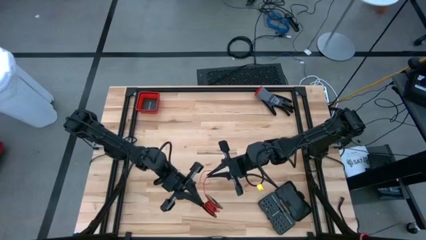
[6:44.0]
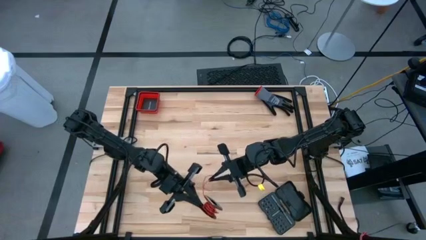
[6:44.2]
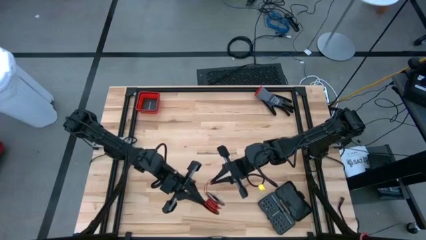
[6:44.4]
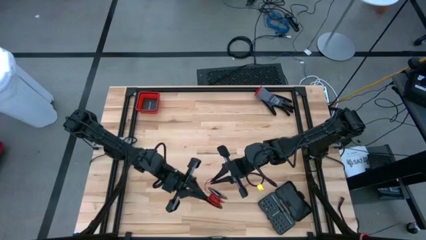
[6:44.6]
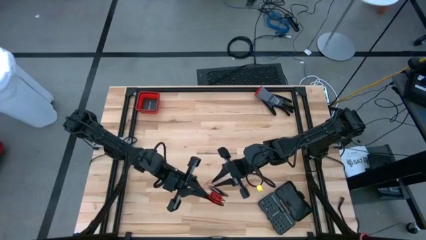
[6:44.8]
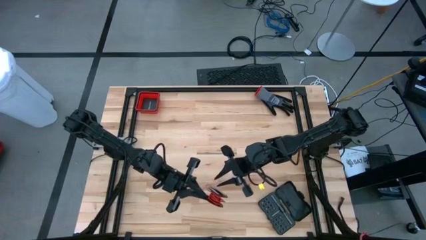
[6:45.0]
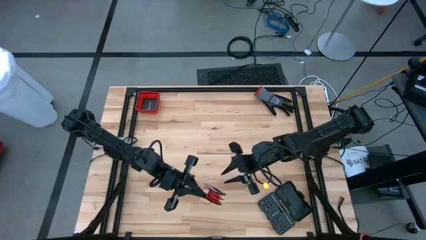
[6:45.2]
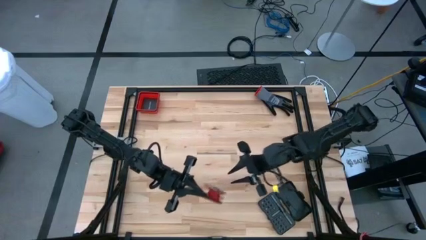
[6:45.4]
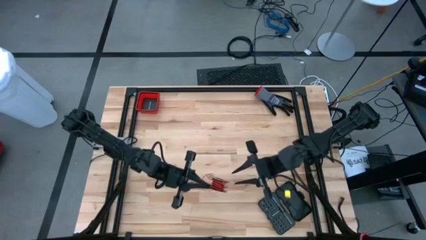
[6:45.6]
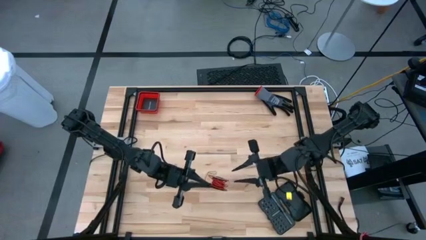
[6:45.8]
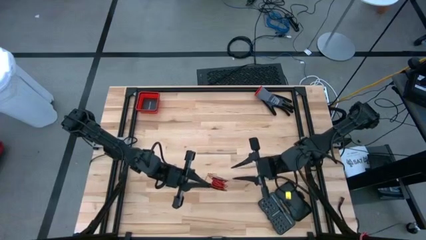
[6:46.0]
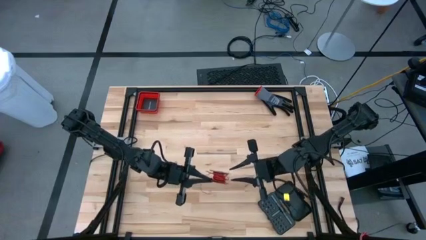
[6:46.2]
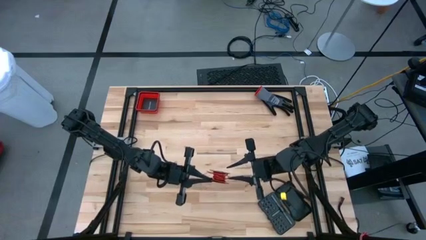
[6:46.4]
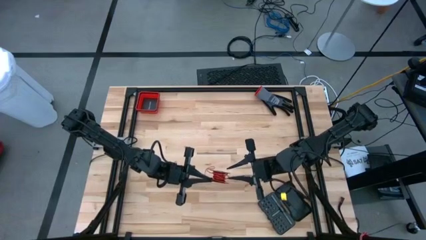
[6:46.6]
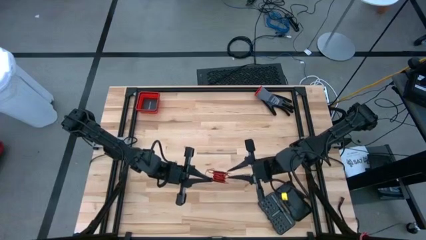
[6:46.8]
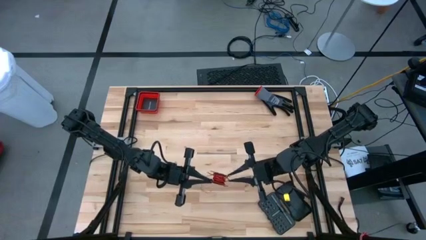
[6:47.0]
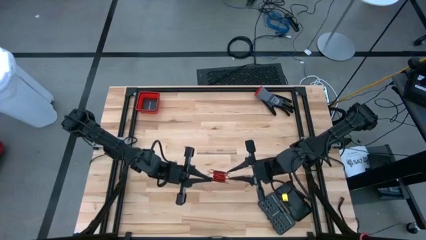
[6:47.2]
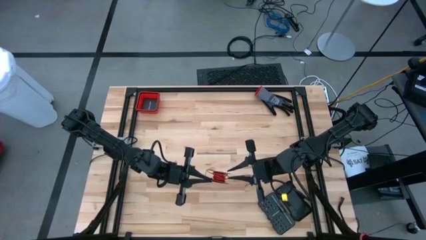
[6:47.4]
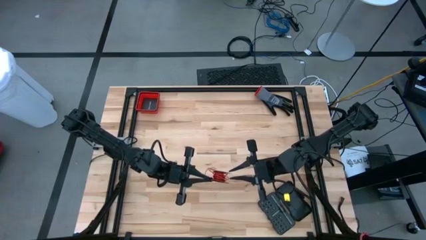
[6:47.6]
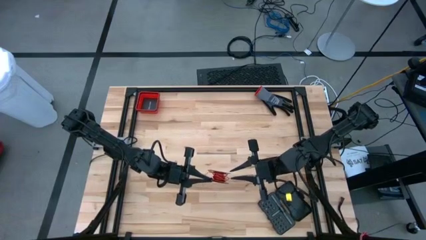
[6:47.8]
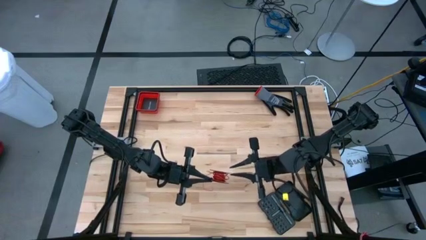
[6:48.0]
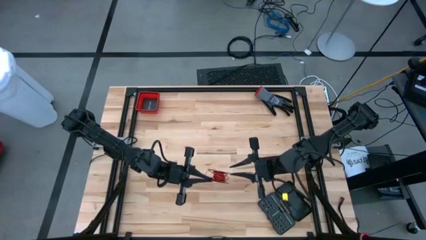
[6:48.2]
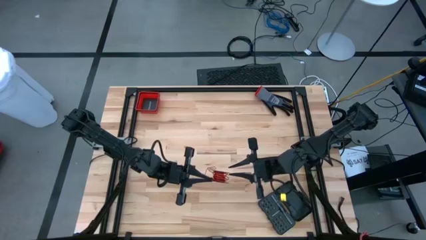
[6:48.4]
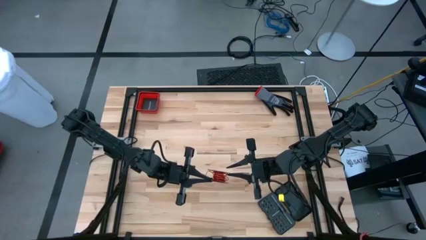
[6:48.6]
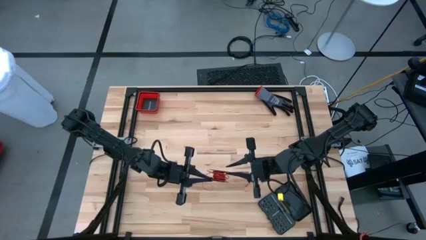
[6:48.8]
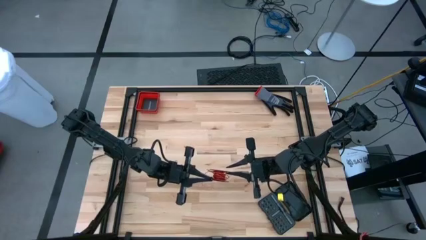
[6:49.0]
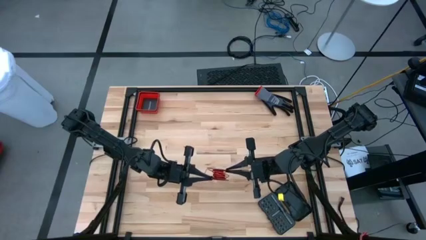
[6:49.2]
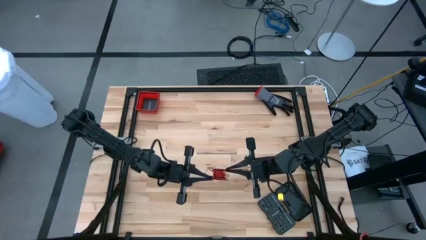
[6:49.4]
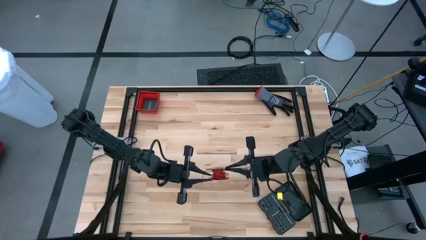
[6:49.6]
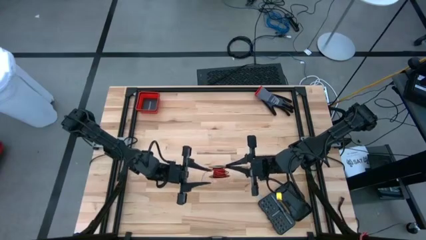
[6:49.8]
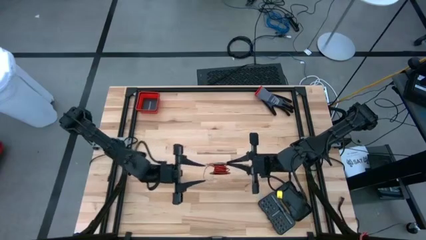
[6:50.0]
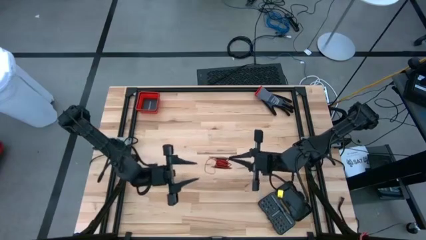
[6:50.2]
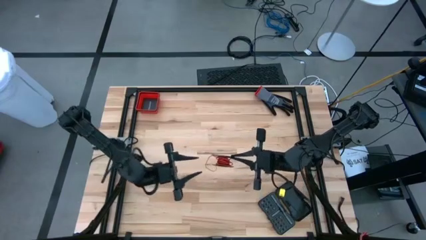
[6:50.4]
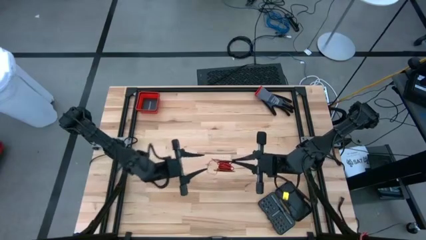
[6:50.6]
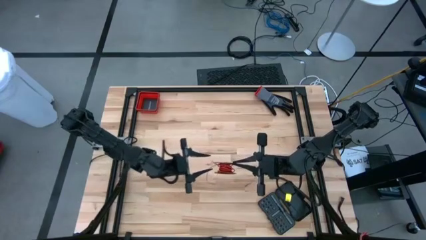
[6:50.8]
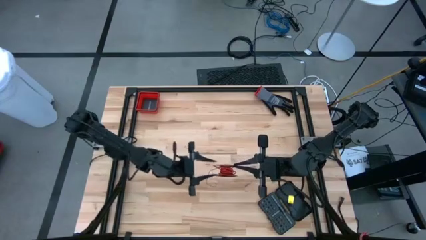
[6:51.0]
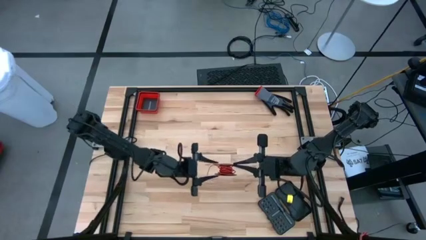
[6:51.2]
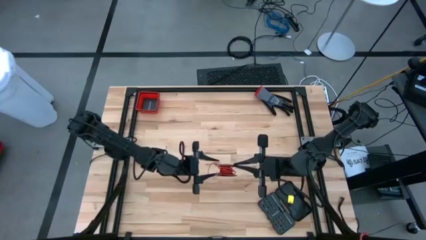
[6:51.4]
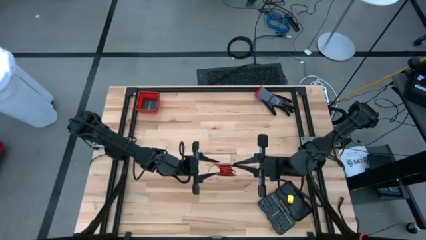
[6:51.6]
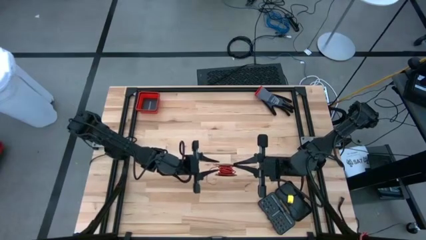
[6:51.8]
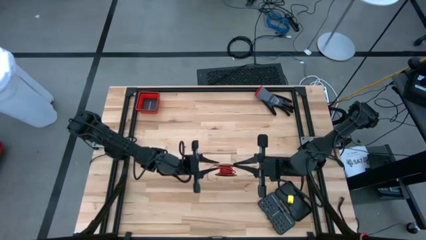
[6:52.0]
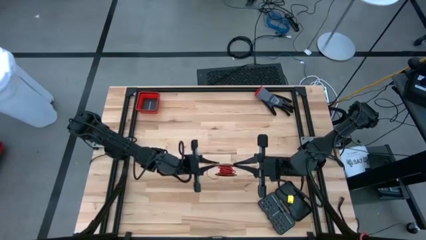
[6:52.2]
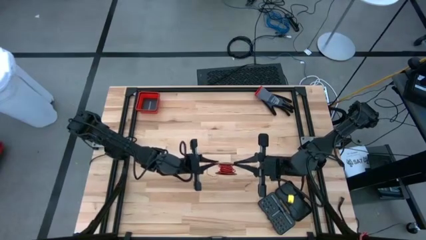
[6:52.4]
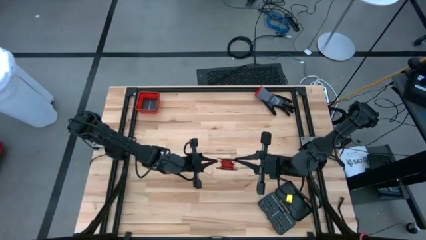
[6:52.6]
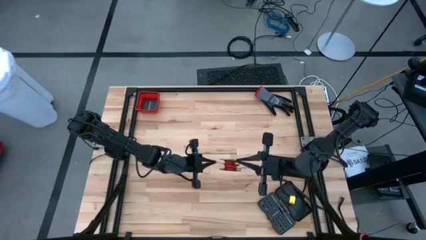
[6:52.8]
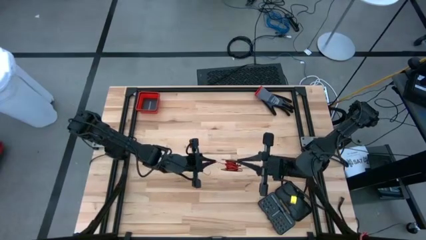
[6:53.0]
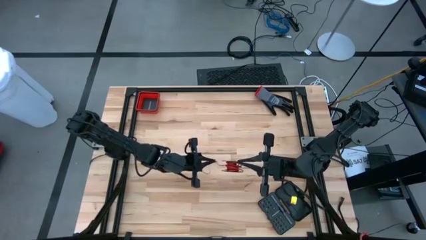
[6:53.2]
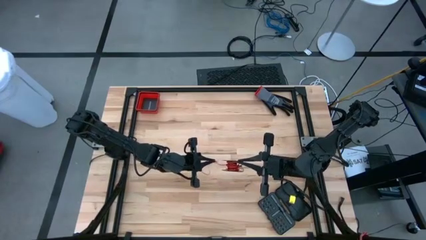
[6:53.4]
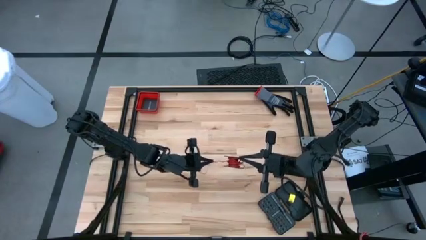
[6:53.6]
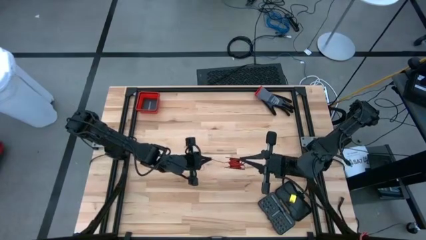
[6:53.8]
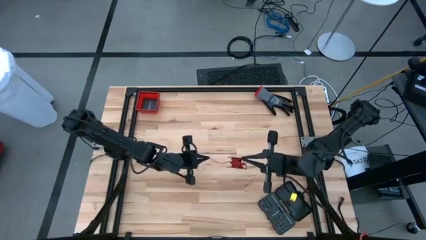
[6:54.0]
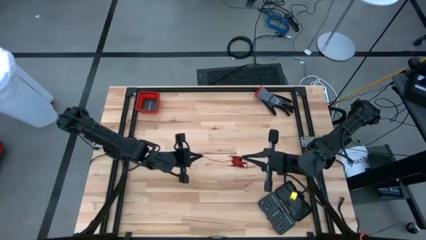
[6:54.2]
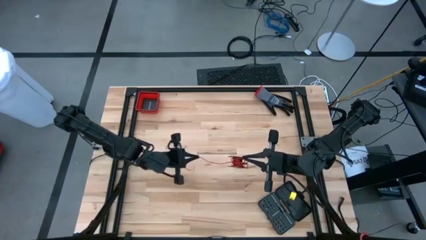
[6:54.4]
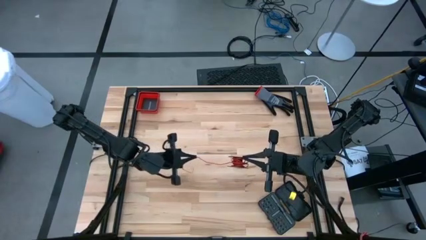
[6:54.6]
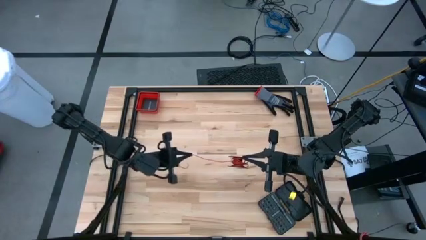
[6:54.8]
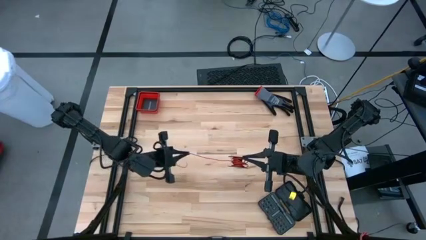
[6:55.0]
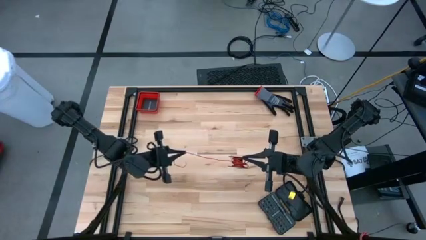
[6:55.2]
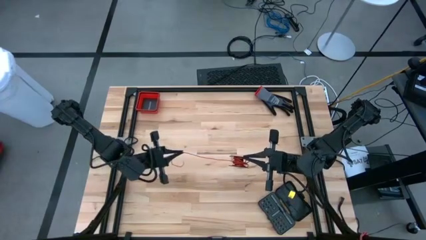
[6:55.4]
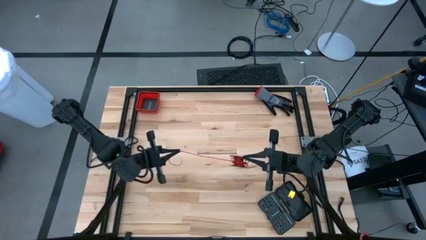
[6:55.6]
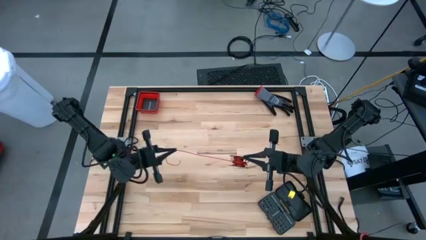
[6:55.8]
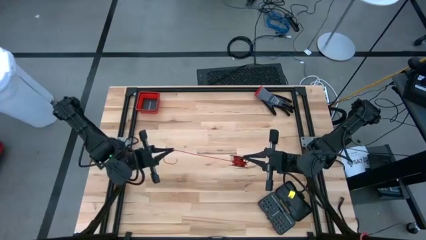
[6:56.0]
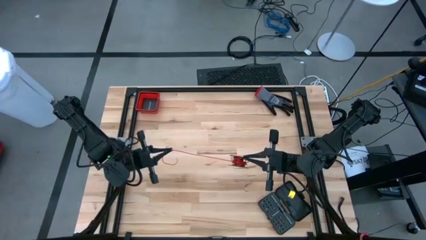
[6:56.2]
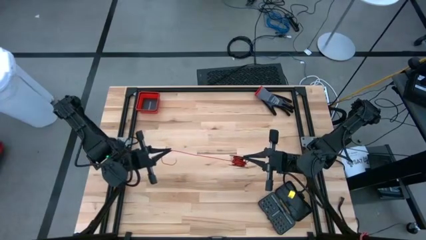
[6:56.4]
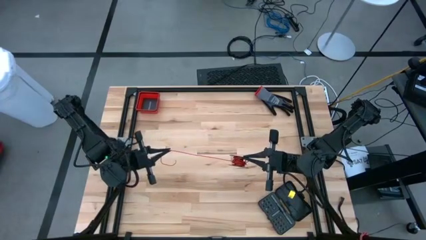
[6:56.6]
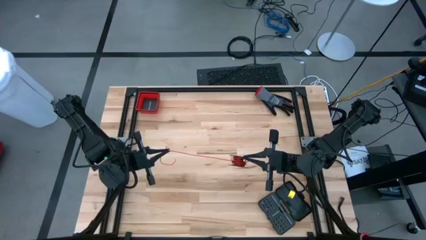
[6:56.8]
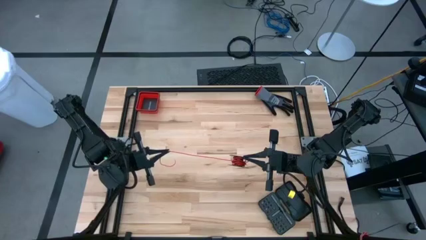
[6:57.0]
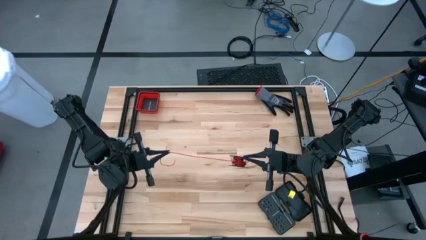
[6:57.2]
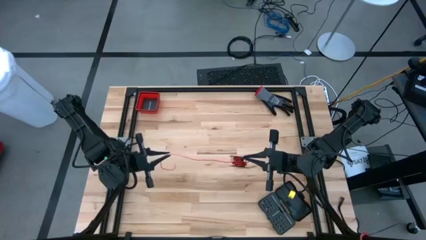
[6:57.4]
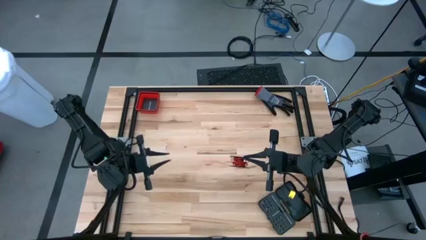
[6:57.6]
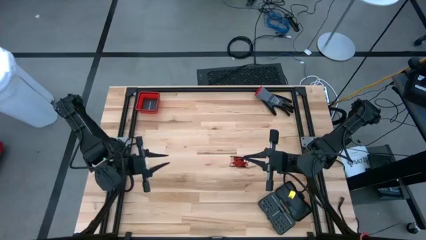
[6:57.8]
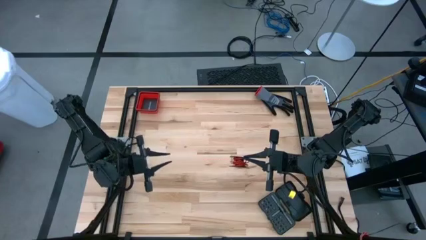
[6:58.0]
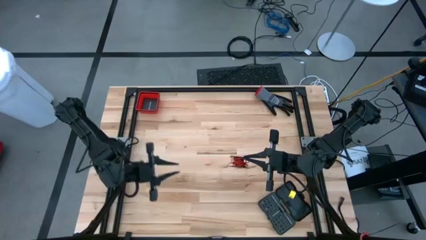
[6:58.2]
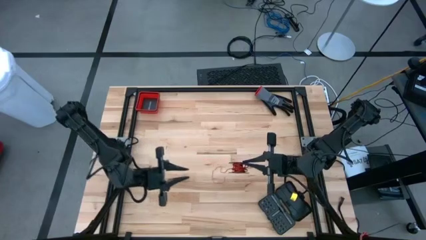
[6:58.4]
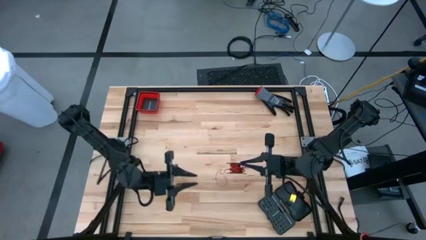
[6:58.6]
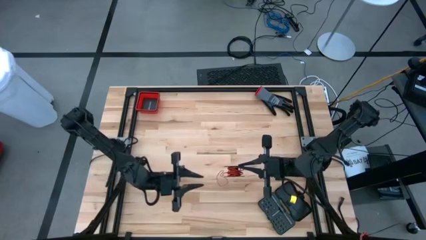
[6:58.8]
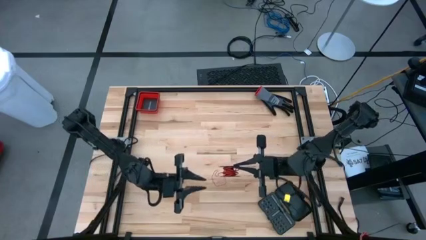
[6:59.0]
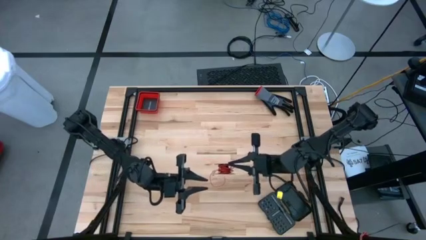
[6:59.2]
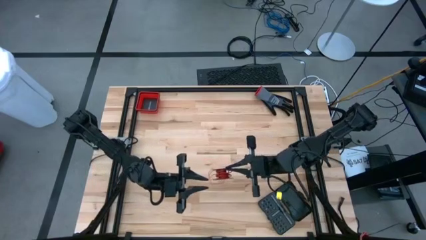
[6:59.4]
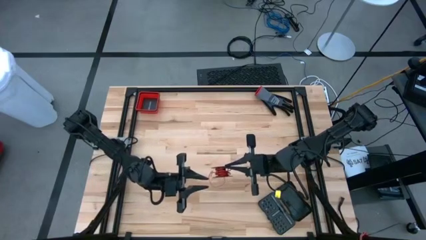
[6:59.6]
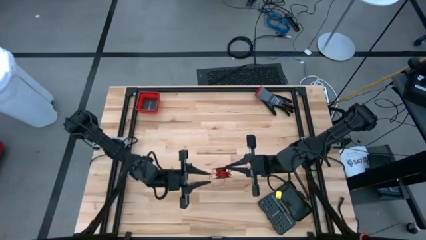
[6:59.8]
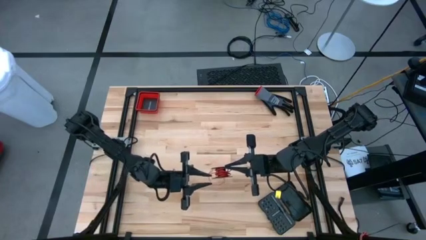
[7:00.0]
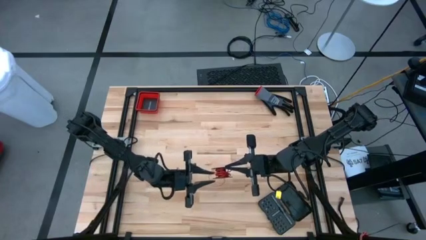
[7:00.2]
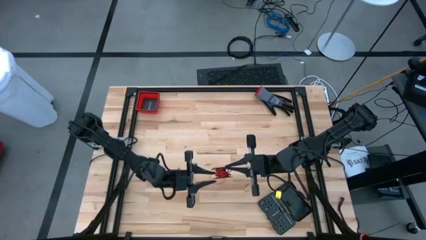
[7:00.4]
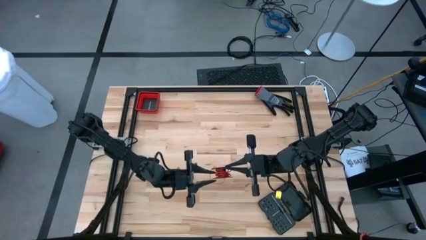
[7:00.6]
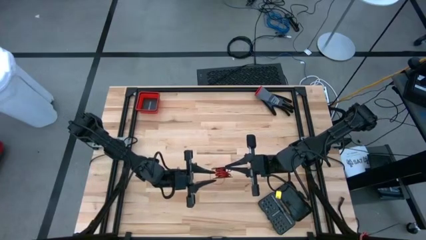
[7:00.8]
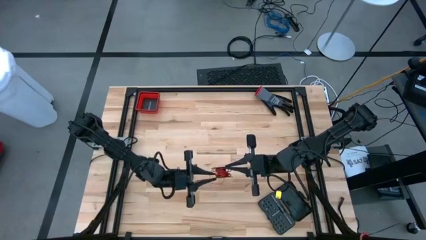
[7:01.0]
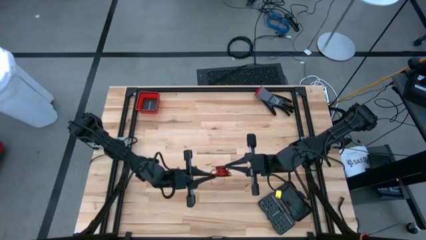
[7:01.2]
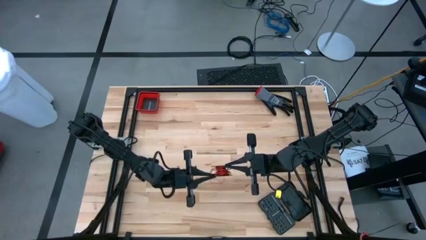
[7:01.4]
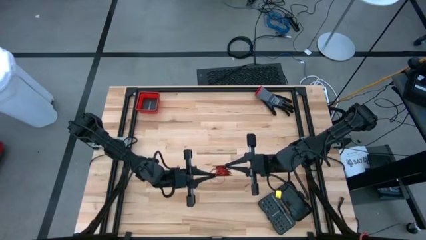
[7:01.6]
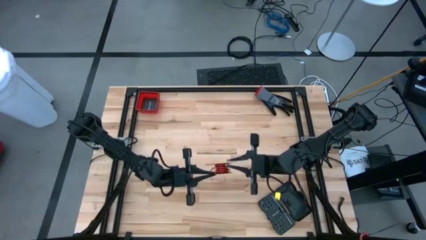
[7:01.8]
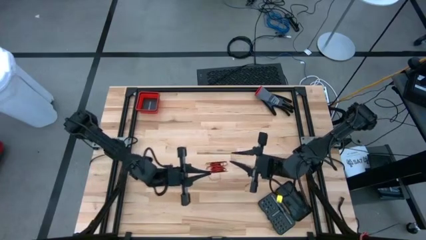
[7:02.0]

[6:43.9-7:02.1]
Task: Coil cords
Coil the red wire onto the spool
